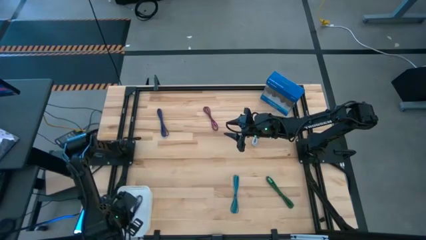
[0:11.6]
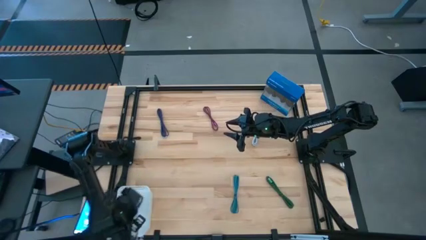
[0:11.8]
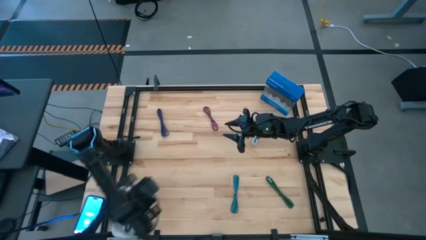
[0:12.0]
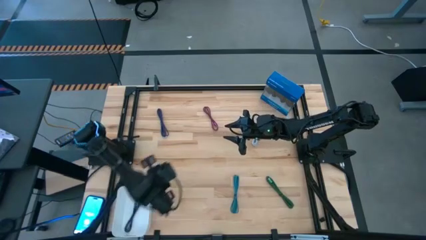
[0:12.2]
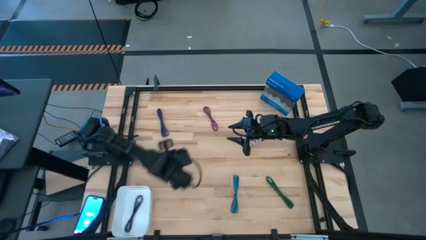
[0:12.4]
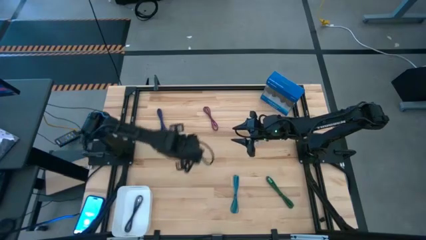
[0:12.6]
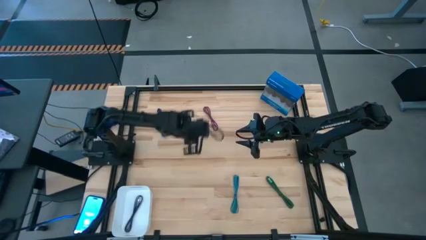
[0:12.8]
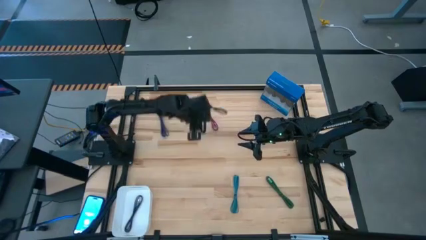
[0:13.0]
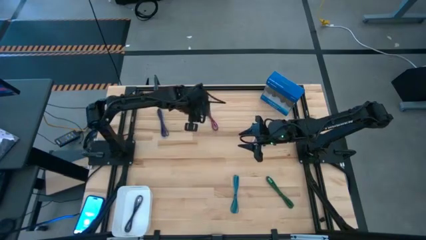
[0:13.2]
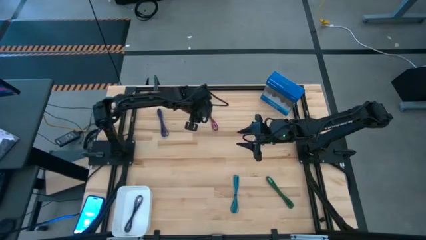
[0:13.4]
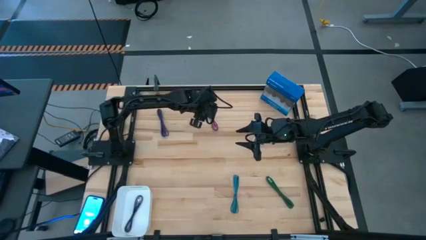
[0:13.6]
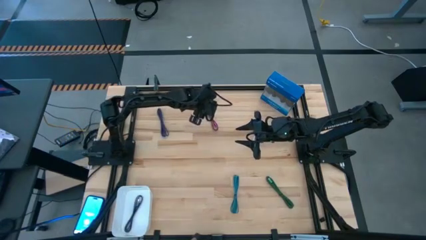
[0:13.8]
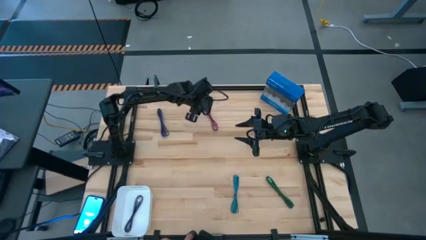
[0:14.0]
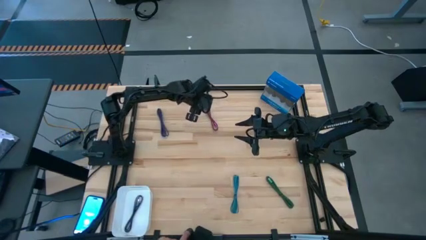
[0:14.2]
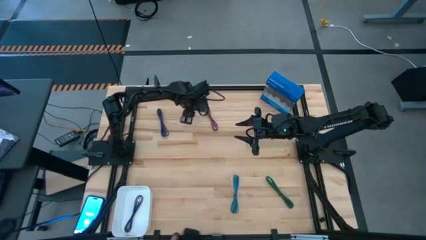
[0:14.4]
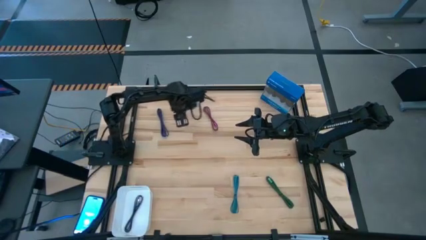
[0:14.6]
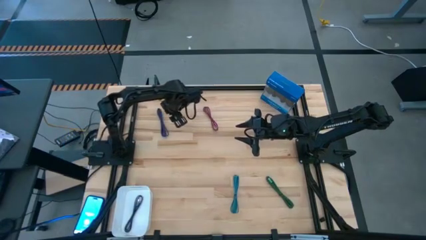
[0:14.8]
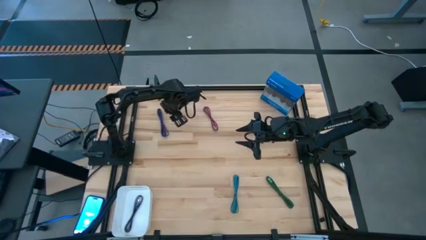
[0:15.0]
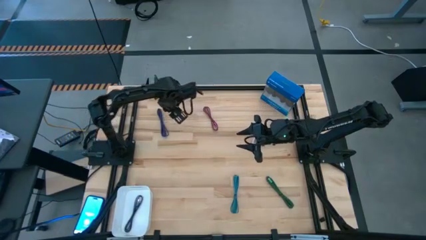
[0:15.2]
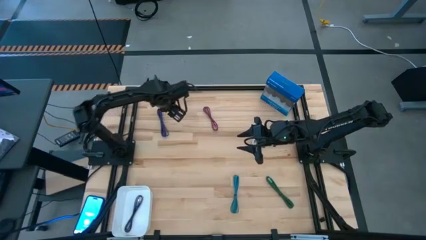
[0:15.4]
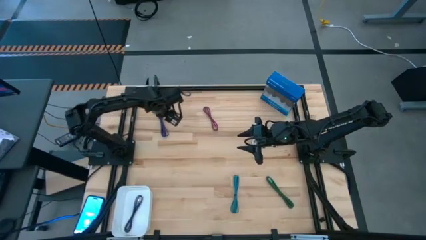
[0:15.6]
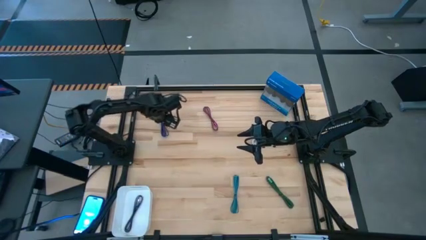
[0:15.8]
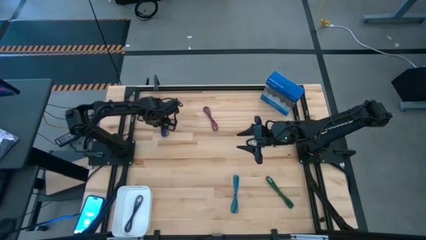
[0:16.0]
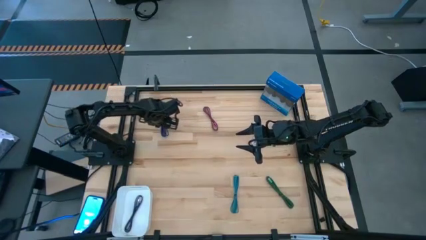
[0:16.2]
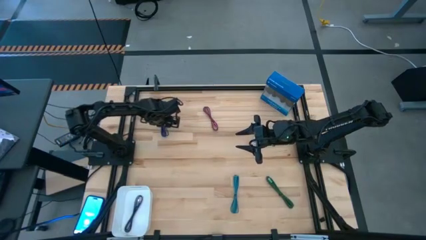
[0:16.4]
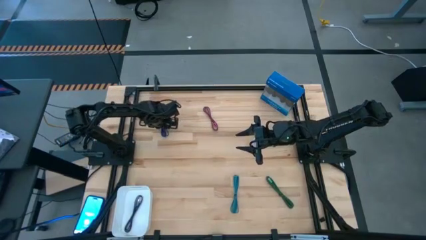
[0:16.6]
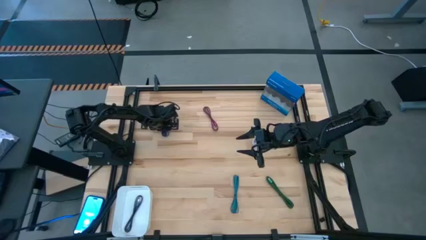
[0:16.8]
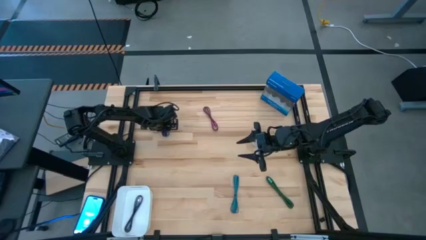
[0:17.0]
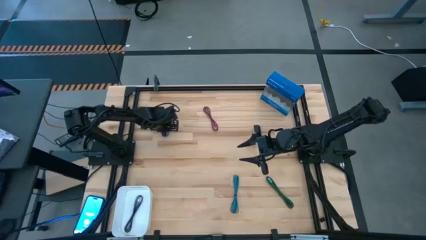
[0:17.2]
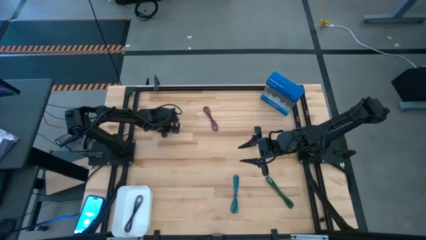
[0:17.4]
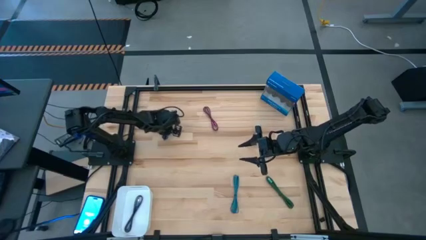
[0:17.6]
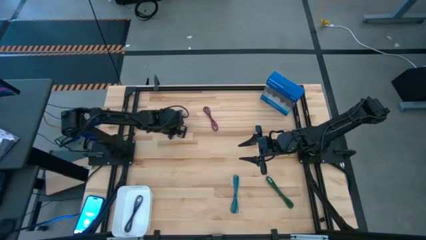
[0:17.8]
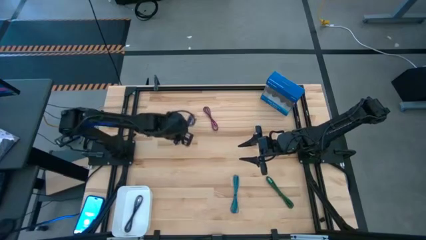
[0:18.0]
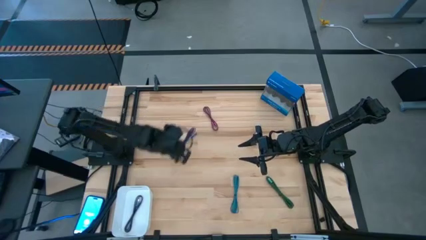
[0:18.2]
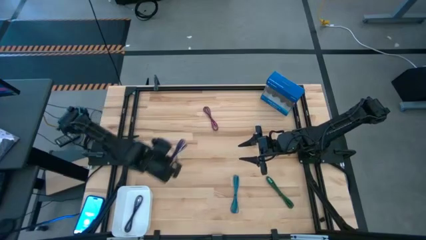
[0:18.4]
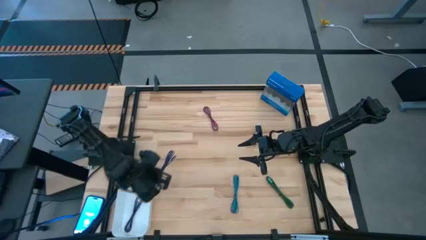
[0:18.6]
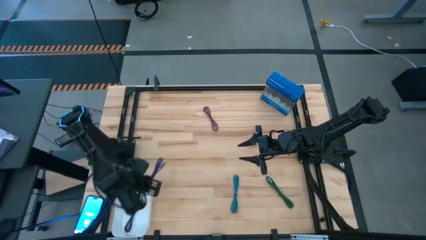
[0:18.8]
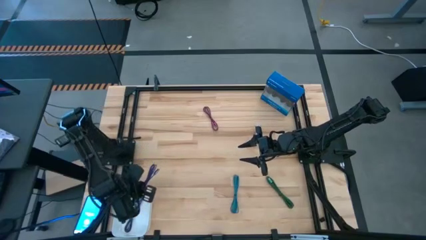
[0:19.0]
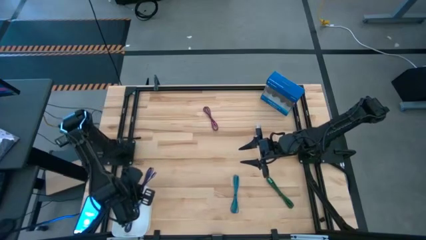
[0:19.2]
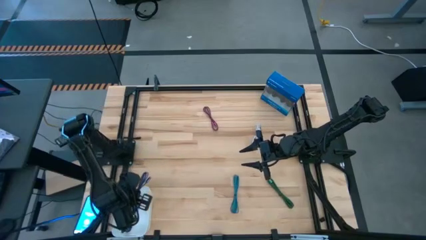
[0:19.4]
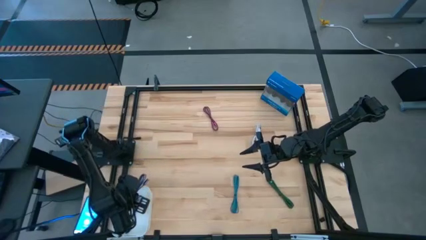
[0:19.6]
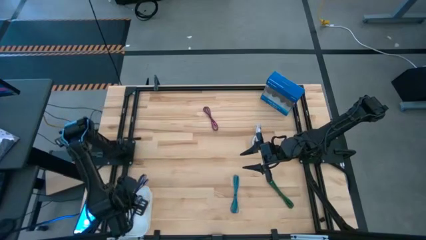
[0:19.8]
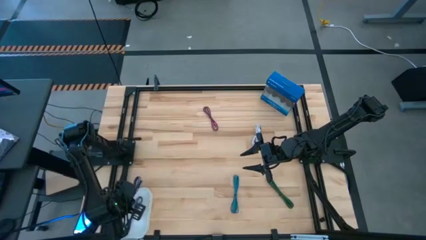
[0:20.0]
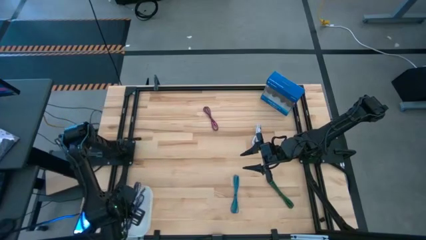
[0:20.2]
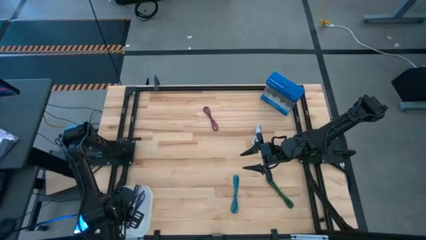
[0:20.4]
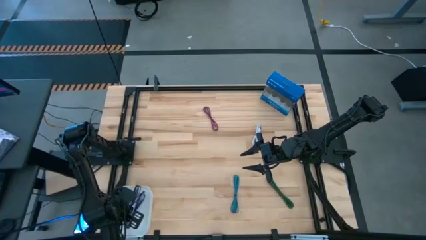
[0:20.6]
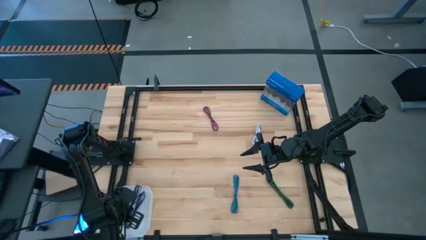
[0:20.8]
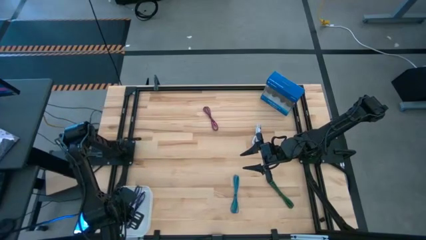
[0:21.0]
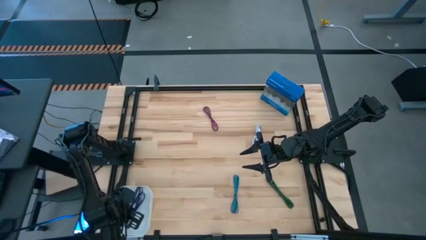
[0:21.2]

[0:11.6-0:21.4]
Task: Pick and place USB-C Cables
Put the dark blue charger cable into the white bin

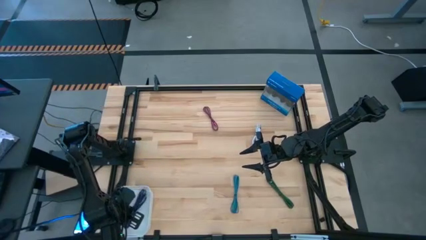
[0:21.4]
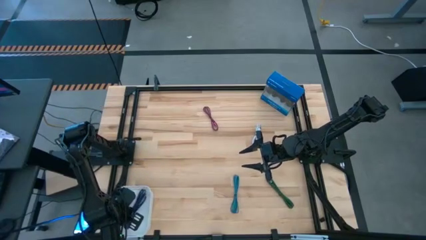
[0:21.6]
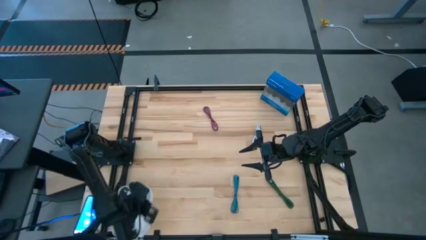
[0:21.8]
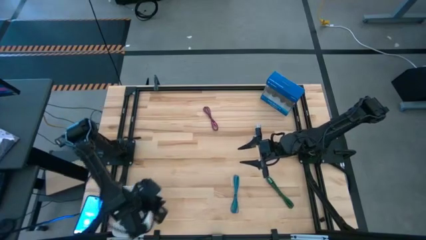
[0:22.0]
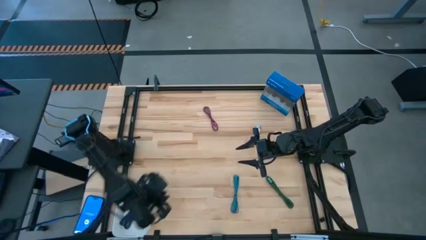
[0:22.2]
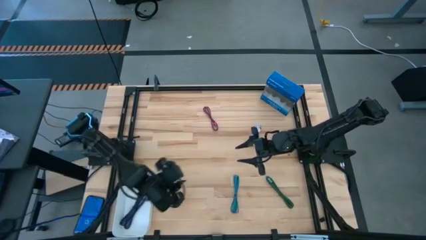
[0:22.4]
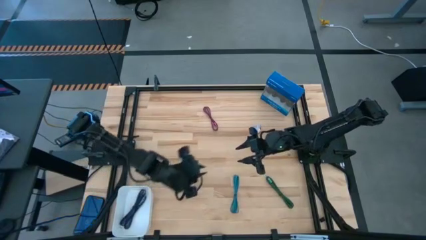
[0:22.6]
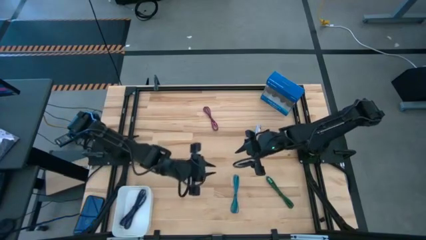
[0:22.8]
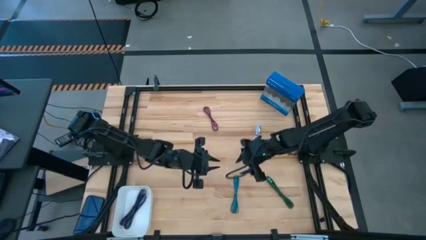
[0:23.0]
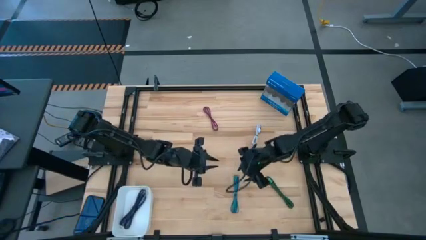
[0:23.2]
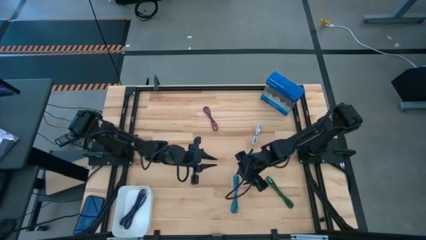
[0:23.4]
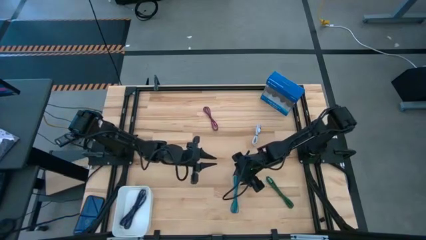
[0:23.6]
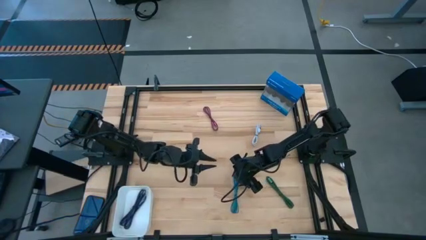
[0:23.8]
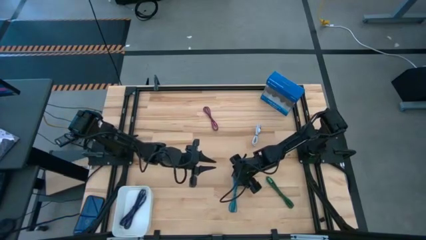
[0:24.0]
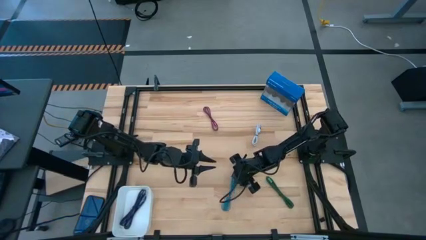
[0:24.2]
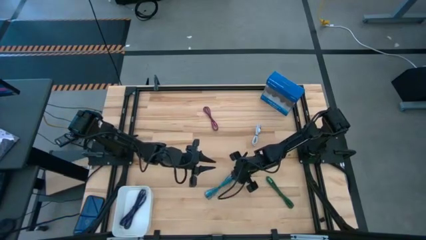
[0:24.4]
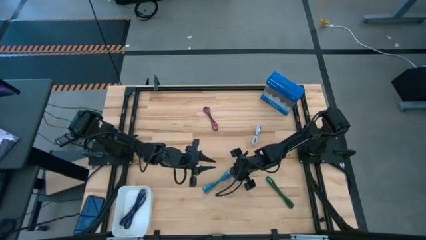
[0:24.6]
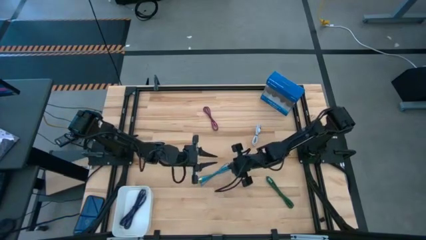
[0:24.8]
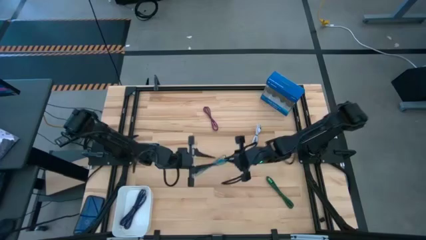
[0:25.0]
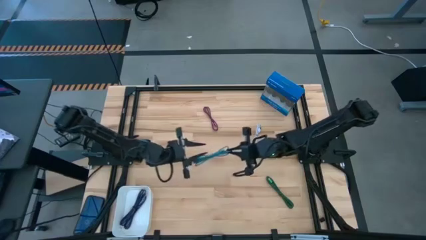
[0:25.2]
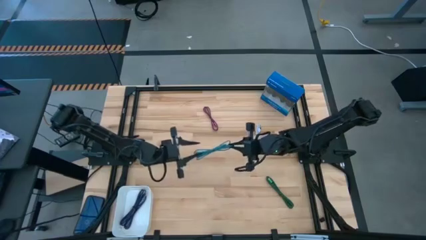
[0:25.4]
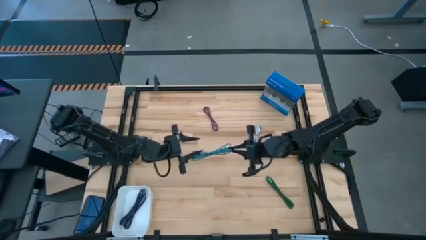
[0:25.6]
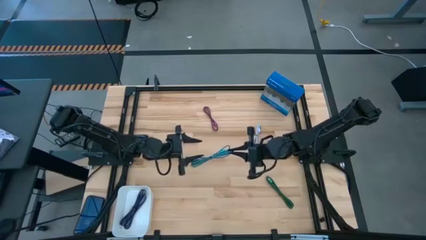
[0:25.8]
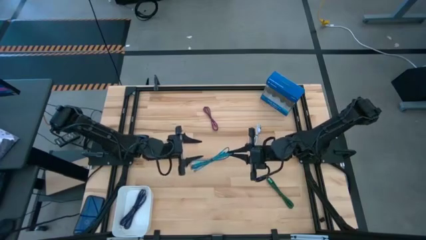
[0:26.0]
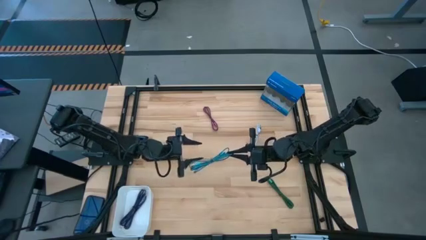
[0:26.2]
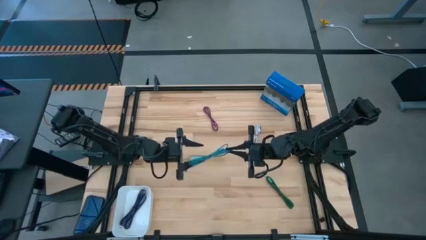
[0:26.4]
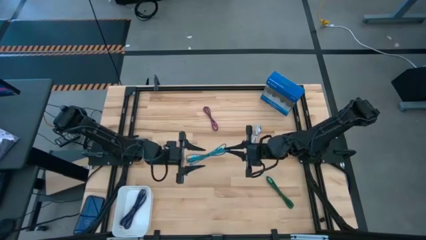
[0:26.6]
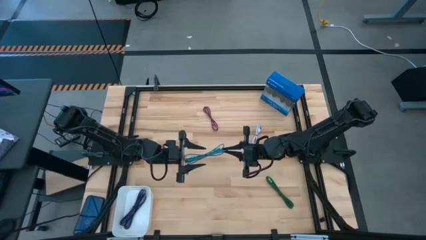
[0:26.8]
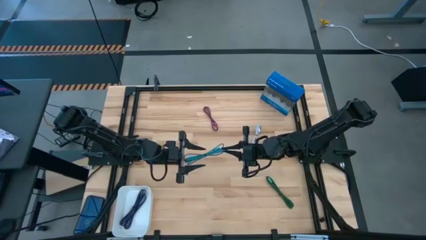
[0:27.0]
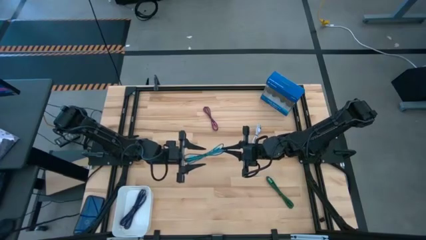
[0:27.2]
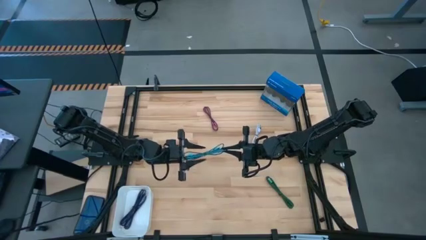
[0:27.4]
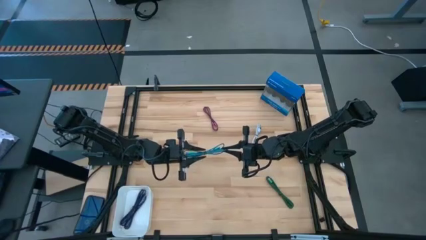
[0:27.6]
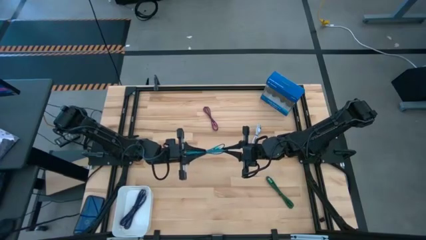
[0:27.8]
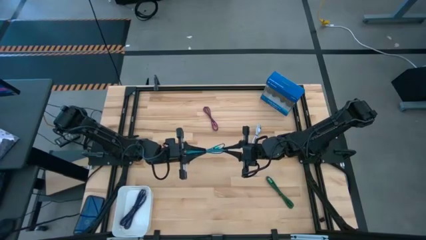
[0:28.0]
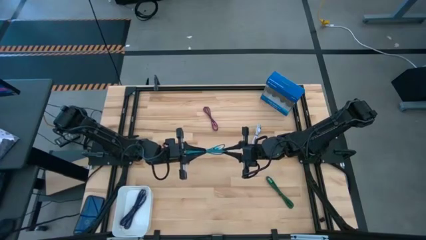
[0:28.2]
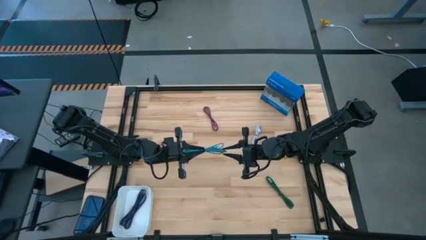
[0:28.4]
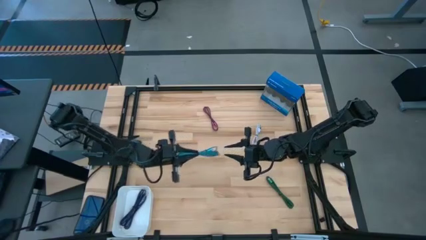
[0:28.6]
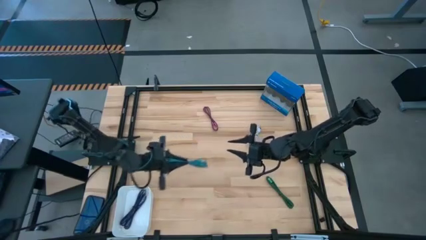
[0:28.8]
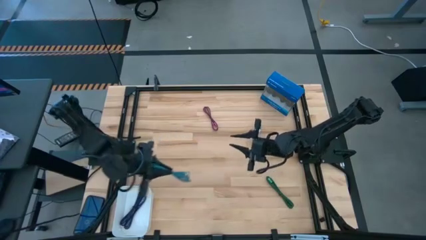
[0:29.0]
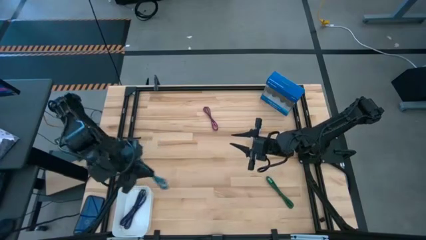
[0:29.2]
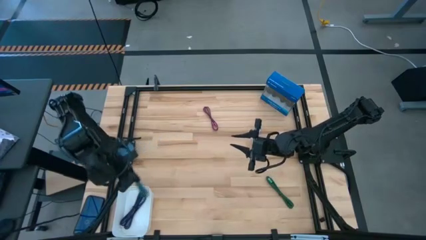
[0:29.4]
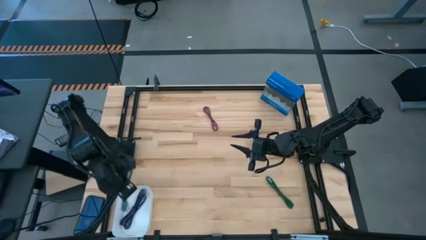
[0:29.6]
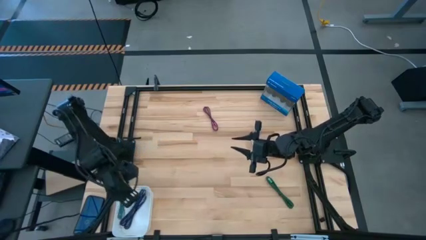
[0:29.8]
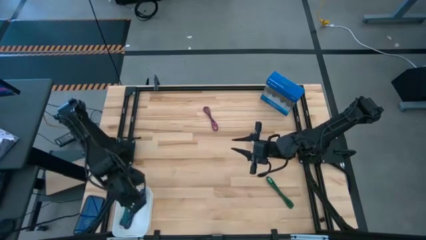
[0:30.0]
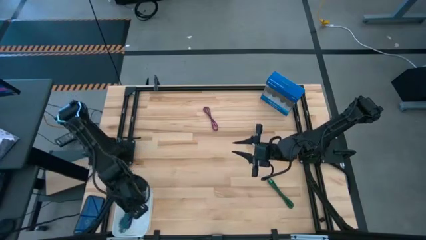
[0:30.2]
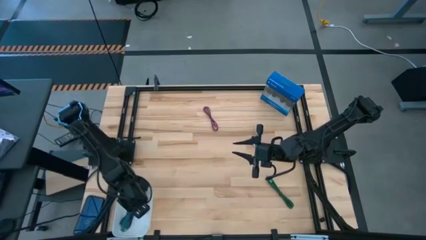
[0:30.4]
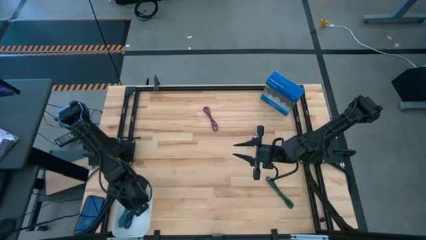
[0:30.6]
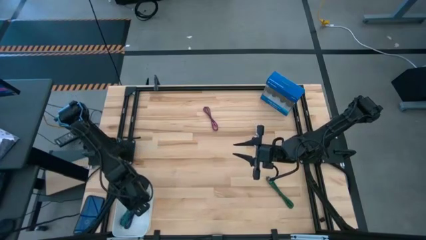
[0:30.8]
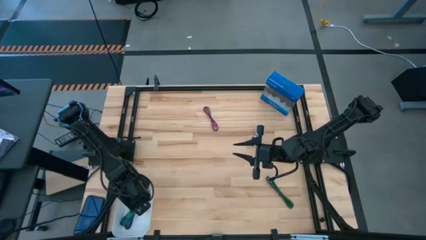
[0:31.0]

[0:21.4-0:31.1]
Put the light blue charger cable into the white bin
